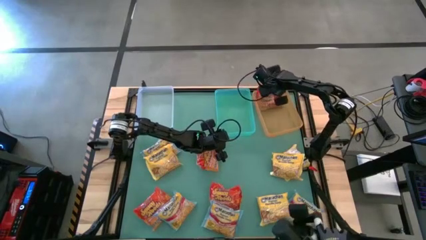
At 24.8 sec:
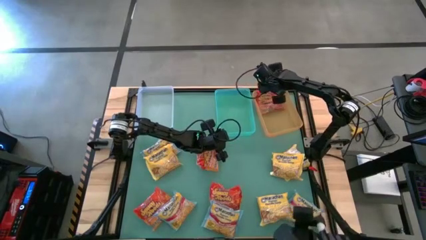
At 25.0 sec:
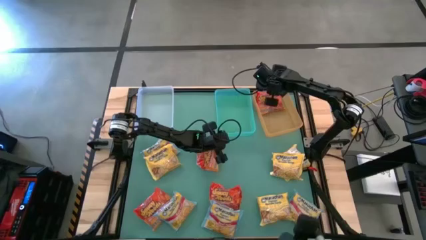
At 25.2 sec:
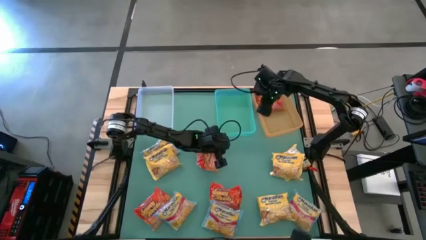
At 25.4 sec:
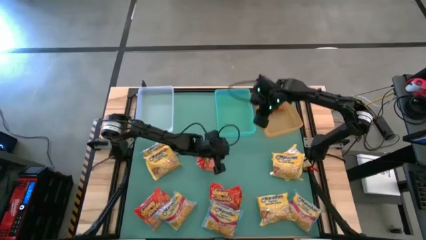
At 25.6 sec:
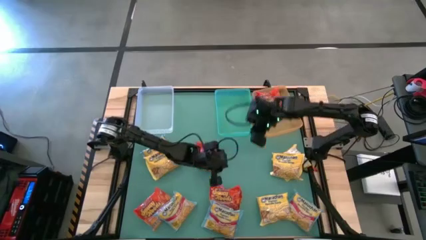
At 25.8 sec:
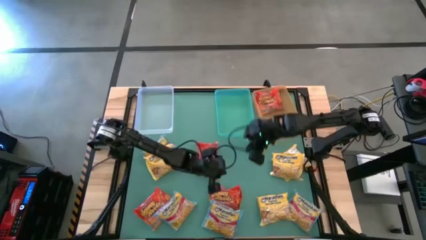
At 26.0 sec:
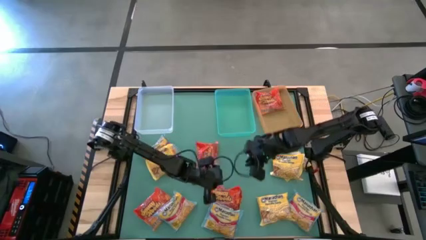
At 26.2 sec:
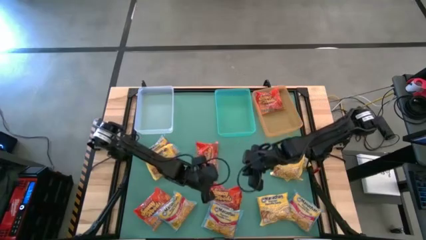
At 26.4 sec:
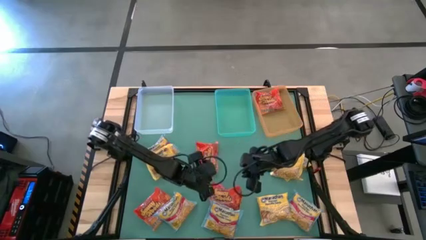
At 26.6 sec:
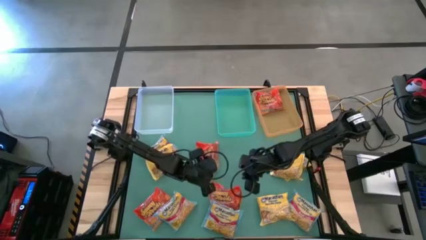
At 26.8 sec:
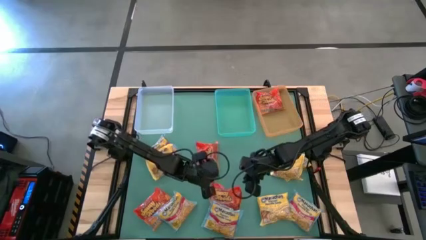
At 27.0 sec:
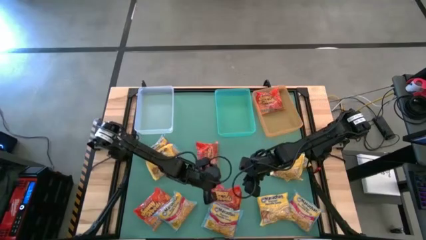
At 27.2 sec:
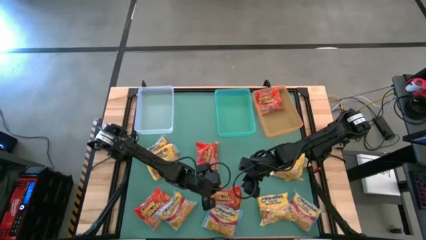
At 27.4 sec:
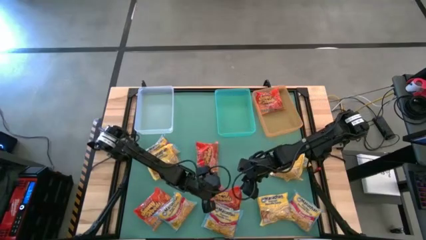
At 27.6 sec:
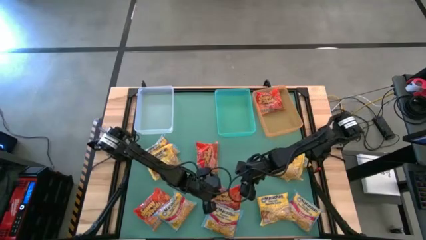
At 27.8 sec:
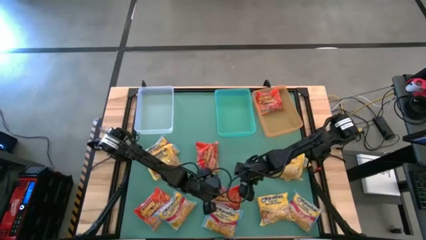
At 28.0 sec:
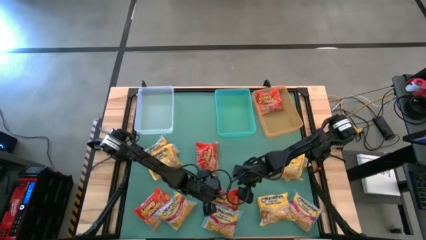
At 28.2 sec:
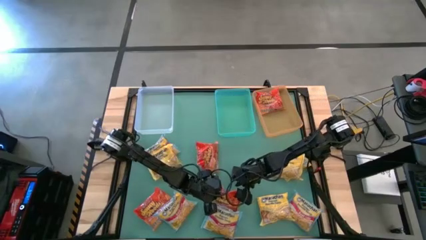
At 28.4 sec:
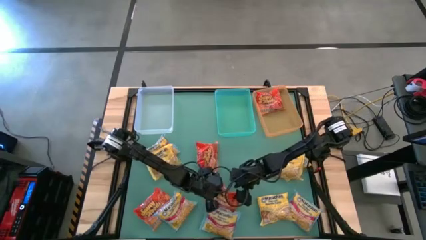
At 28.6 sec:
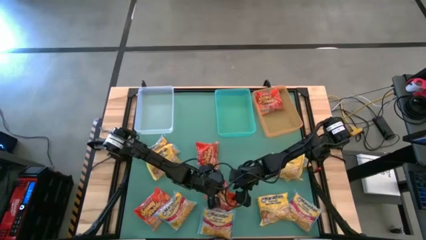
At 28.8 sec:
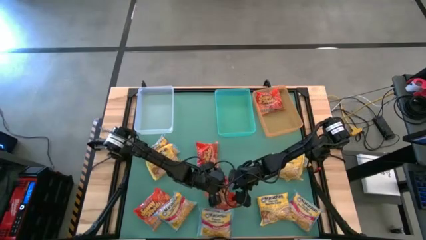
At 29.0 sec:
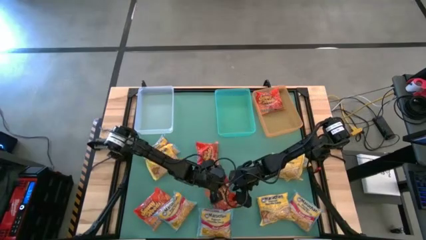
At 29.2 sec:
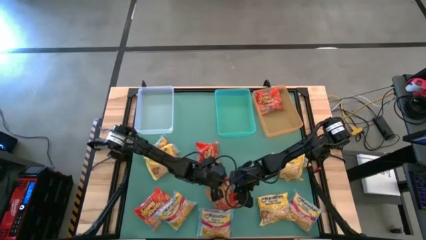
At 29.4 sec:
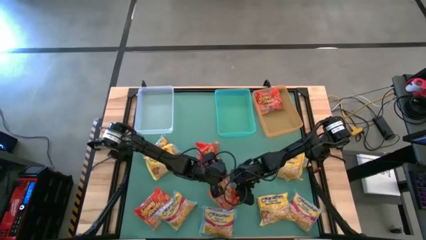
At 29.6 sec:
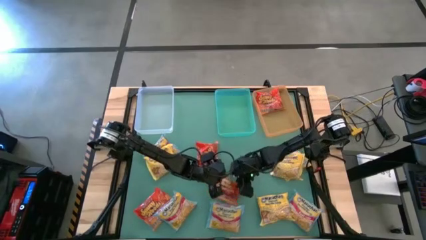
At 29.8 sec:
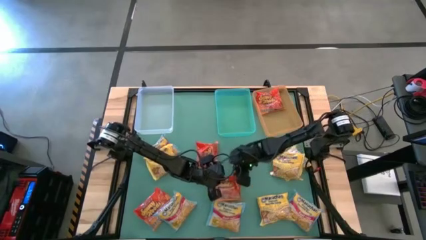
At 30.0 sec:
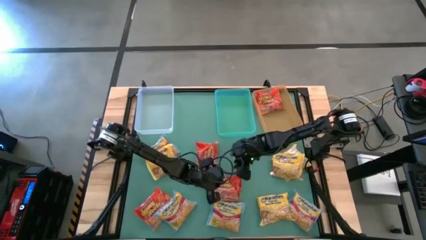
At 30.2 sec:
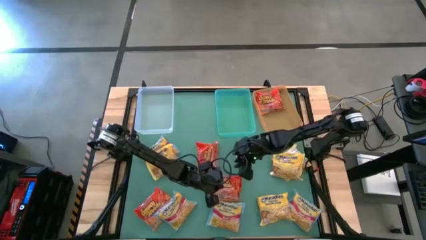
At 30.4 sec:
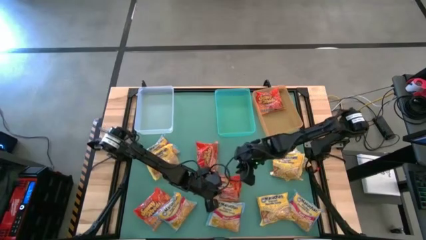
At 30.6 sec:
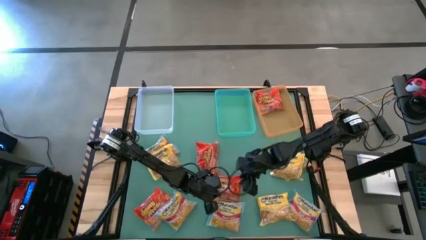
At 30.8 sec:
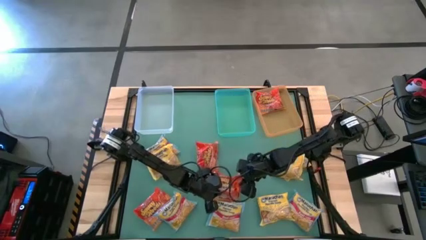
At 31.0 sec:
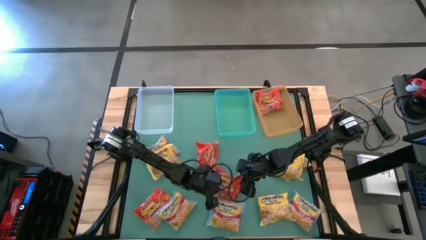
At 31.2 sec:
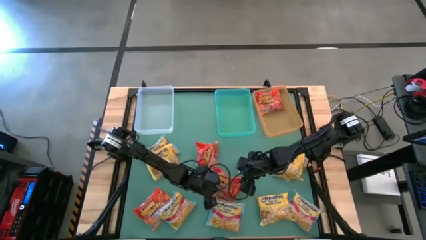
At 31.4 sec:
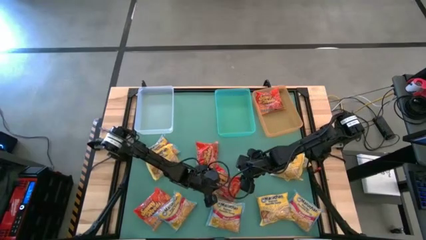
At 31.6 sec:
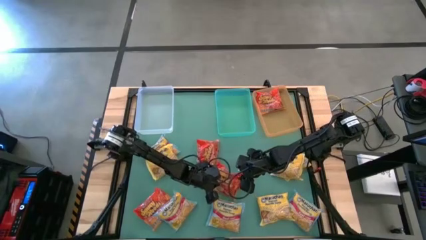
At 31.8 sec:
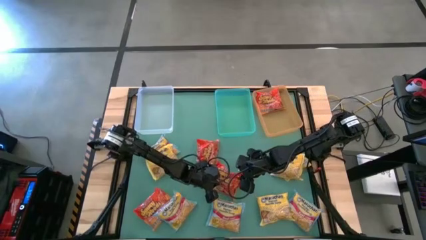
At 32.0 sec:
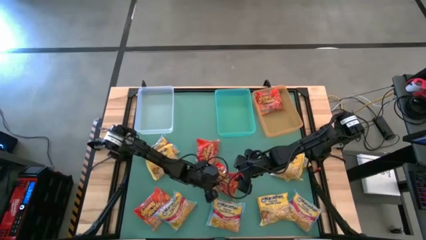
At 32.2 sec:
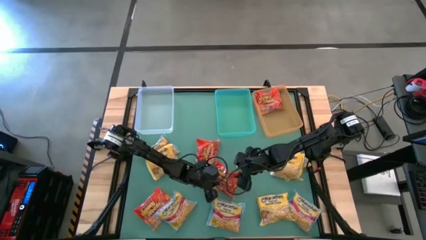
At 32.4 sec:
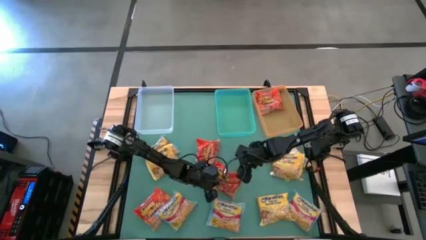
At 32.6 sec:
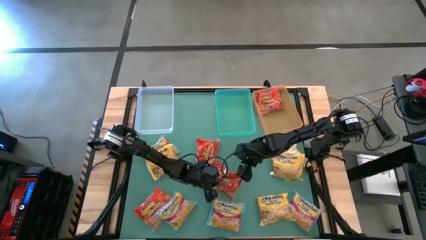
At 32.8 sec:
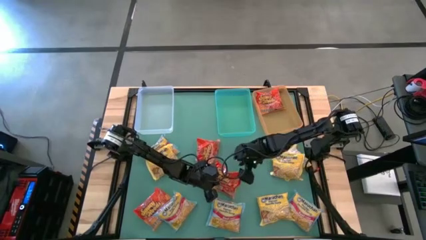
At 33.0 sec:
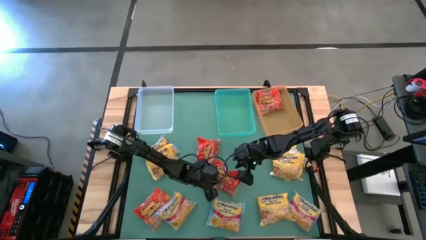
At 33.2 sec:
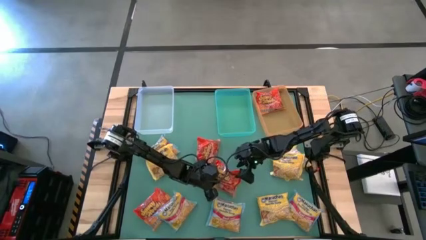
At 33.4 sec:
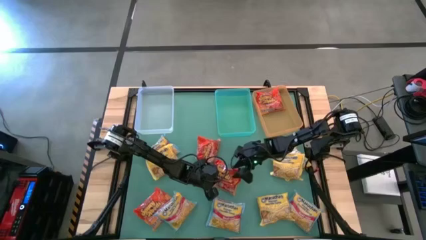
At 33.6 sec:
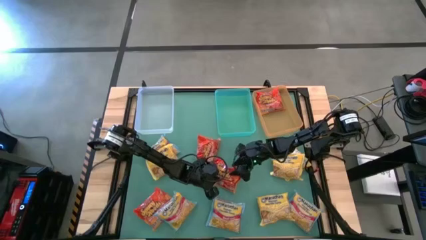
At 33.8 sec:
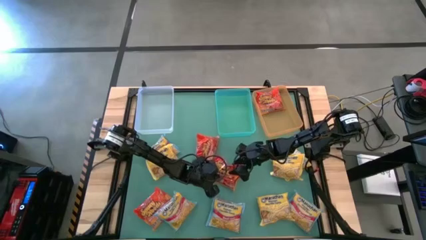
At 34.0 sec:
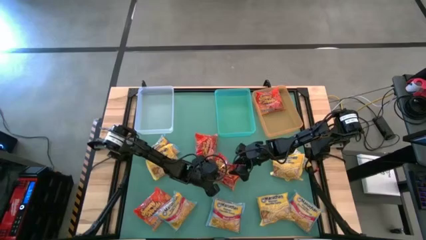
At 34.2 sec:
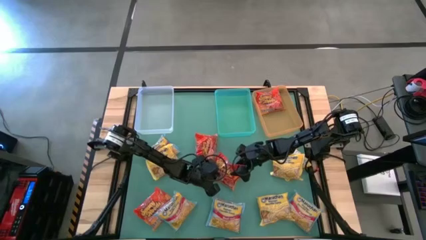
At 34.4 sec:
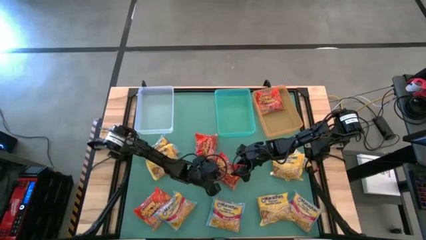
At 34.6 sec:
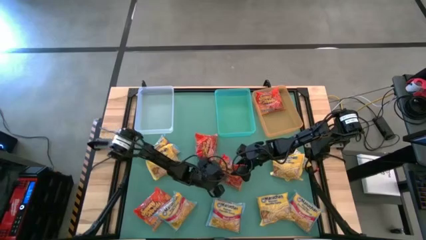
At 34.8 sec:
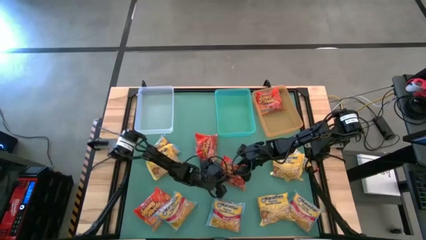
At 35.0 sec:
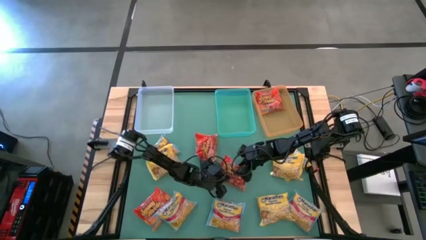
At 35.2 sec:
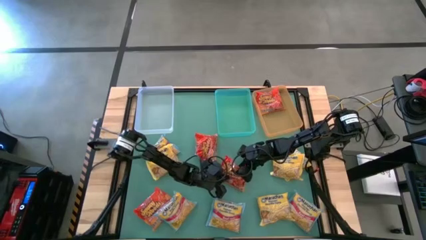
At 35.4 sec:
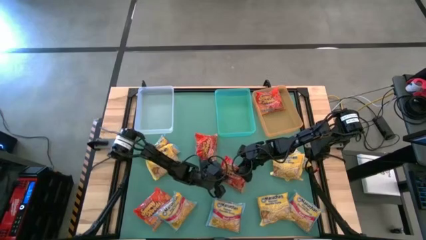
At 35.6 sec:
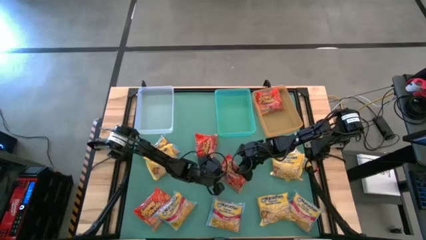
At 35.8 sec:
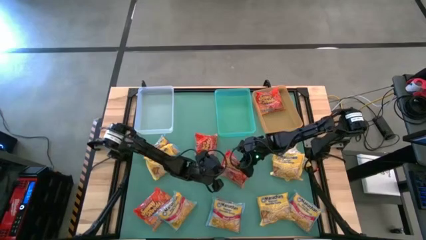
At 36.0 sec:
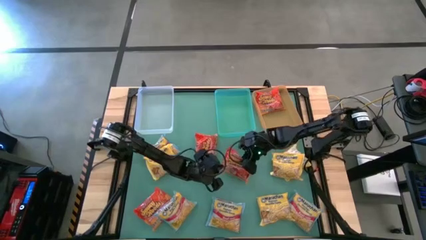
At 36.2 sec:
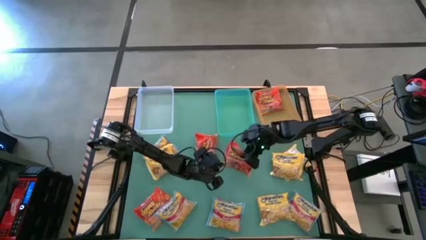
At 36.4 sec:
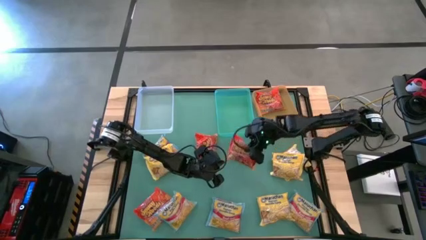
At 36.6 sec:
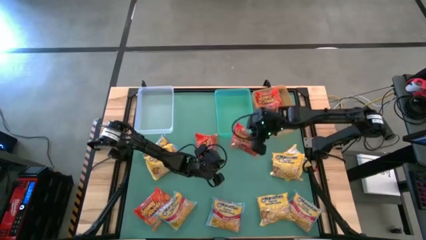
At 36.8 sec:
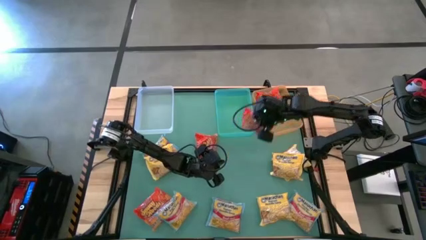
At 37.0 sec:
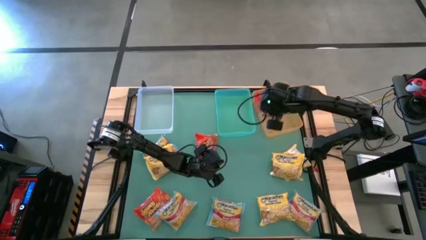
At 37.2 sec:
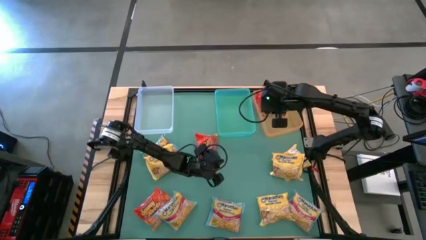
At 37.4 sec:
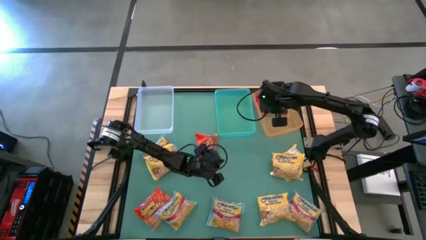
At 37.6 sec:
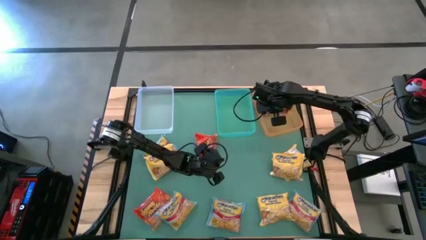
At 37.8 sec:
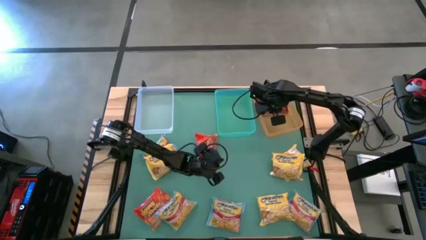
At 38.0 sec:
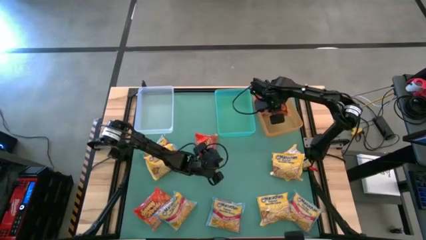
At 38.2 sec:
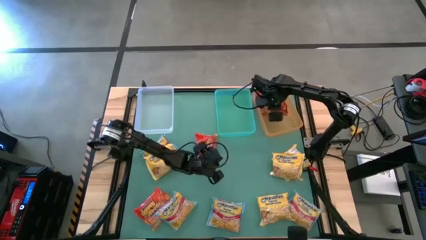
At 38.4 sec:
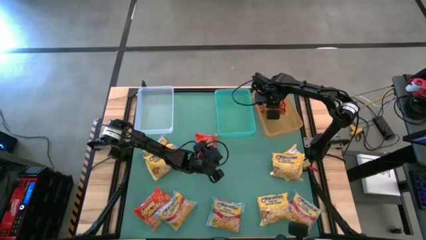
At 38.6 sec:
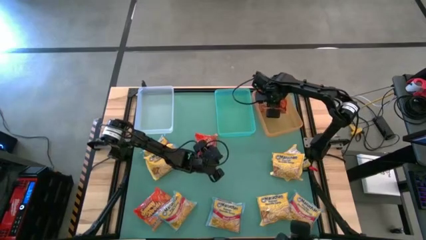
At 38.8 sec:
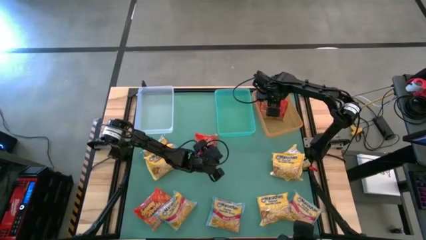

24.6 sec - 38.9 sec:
Task: Sort Maruchan noodles
Put the orange noodle pack into the orange bin
